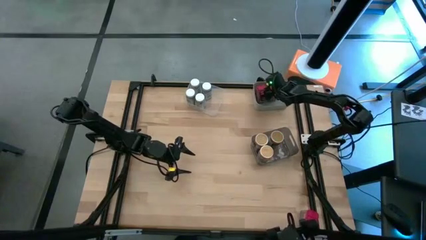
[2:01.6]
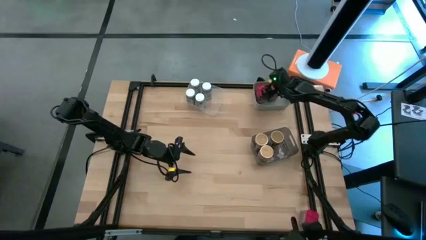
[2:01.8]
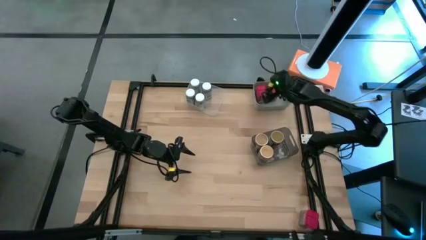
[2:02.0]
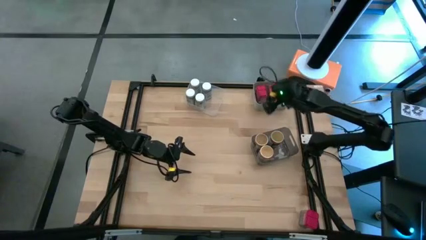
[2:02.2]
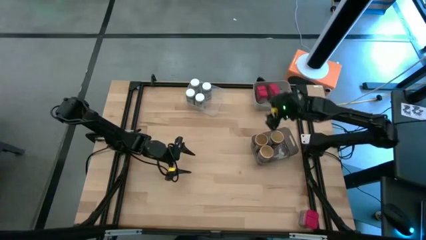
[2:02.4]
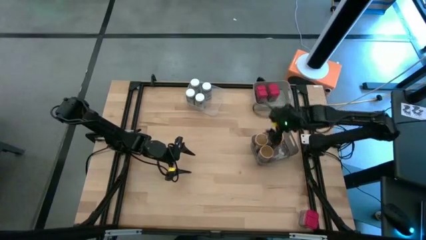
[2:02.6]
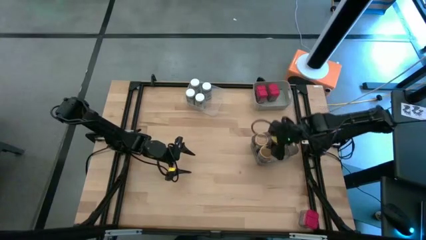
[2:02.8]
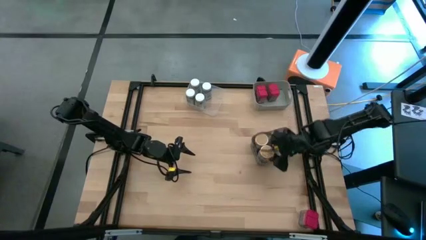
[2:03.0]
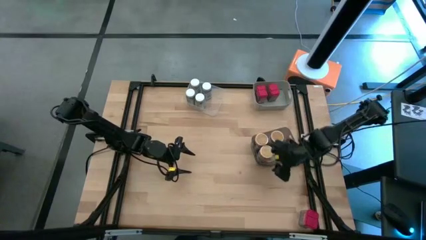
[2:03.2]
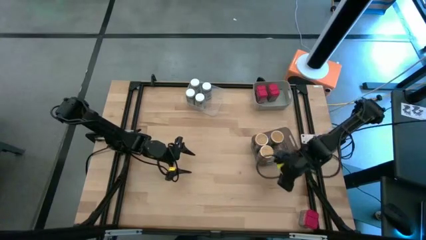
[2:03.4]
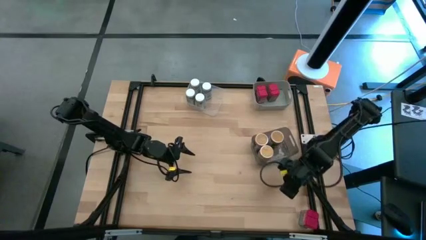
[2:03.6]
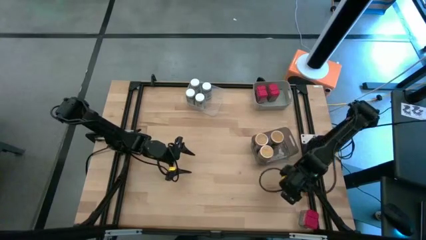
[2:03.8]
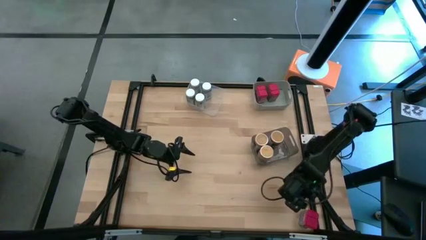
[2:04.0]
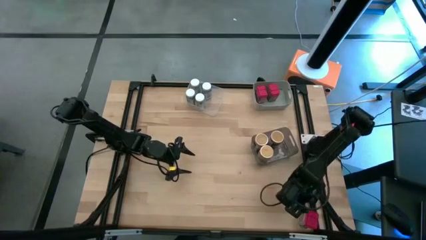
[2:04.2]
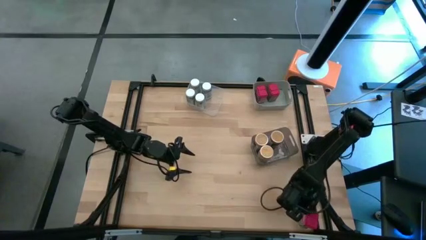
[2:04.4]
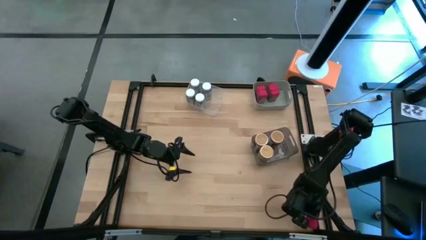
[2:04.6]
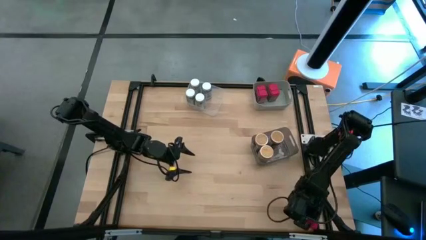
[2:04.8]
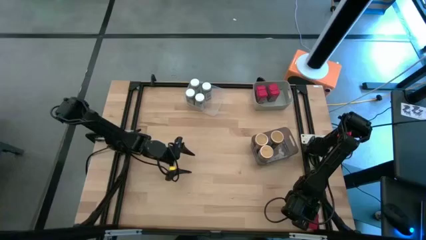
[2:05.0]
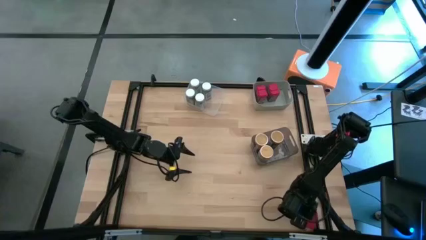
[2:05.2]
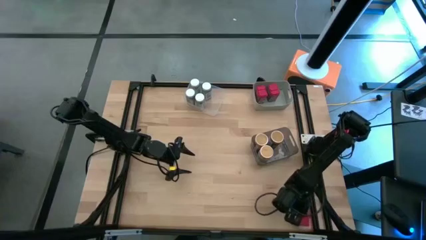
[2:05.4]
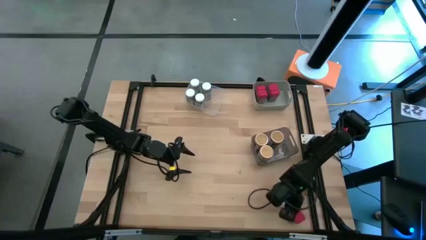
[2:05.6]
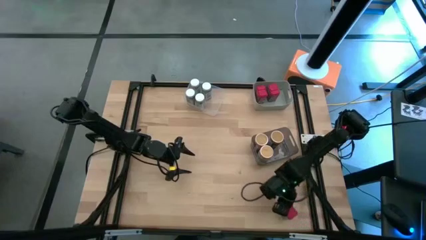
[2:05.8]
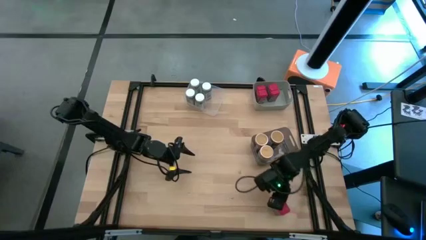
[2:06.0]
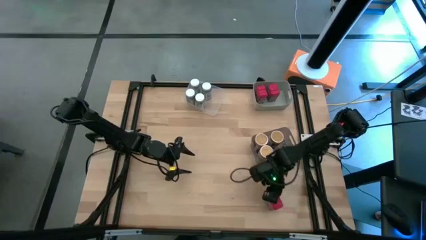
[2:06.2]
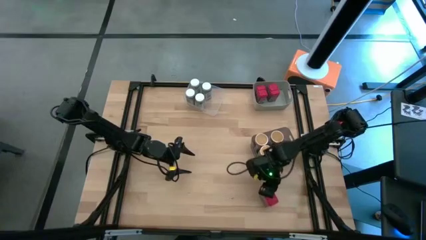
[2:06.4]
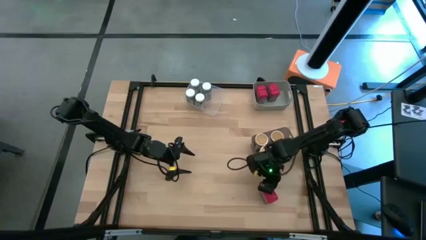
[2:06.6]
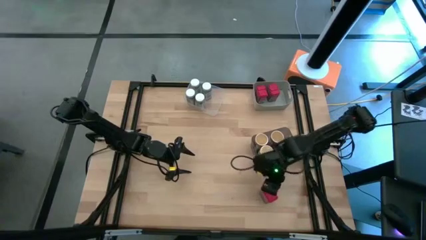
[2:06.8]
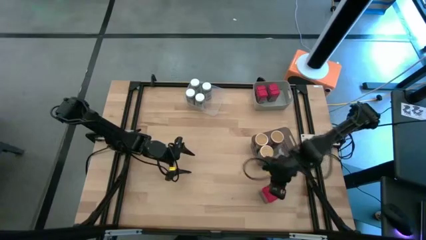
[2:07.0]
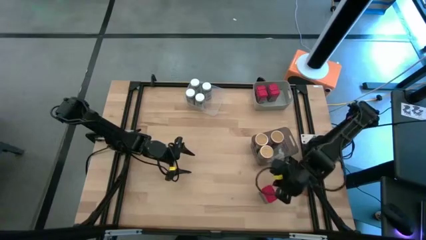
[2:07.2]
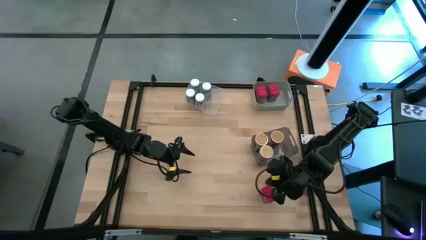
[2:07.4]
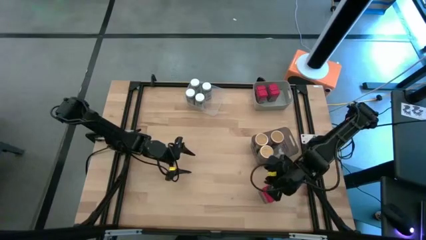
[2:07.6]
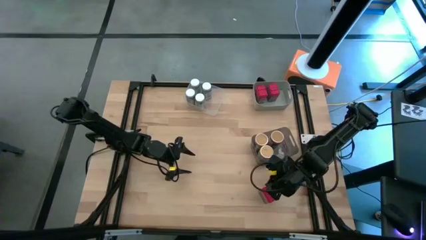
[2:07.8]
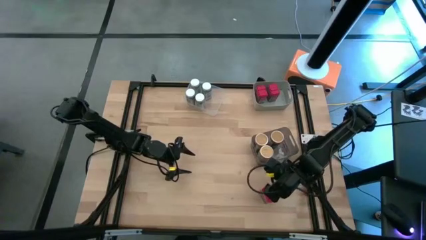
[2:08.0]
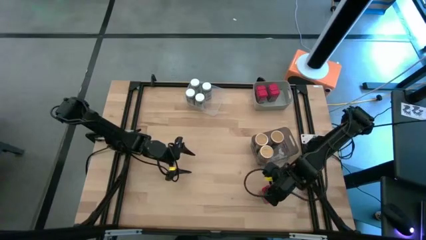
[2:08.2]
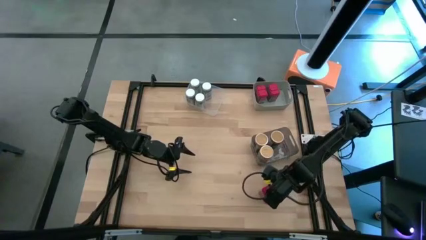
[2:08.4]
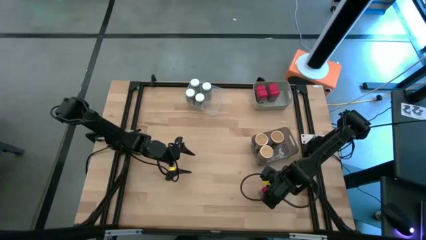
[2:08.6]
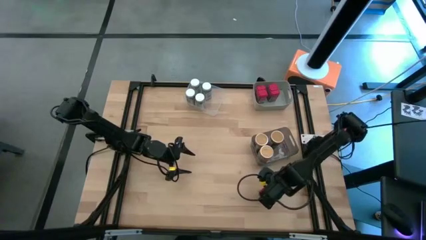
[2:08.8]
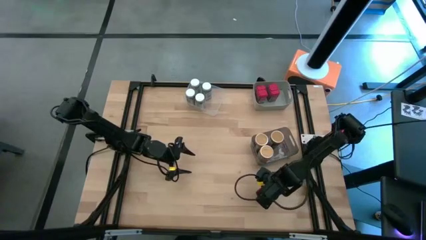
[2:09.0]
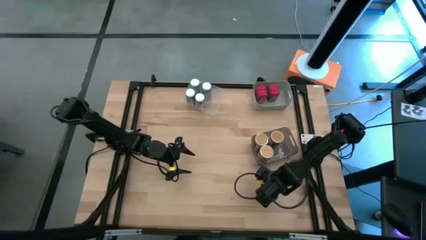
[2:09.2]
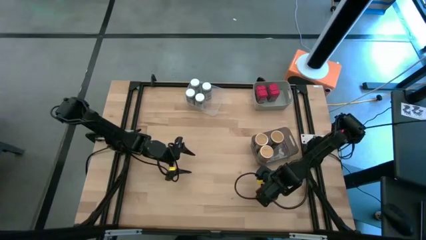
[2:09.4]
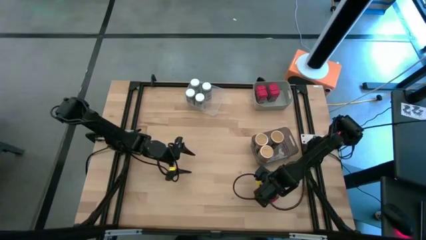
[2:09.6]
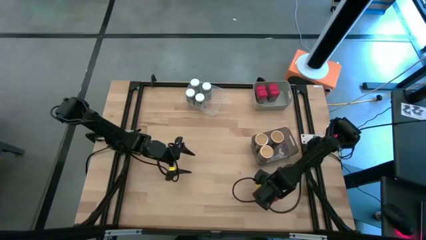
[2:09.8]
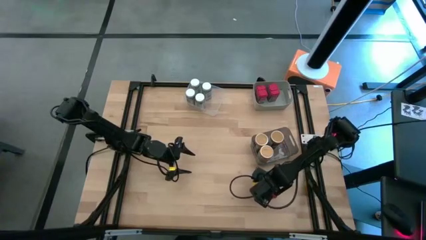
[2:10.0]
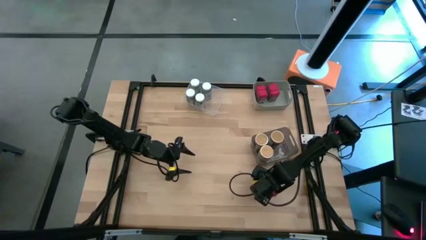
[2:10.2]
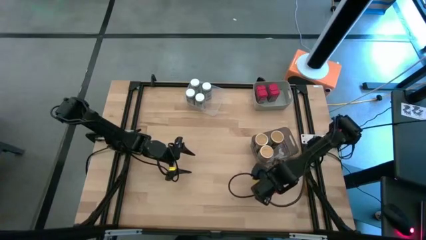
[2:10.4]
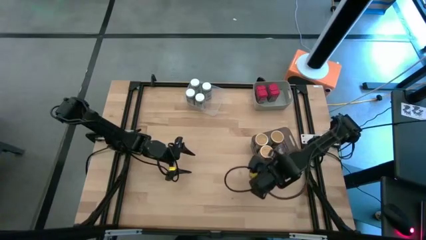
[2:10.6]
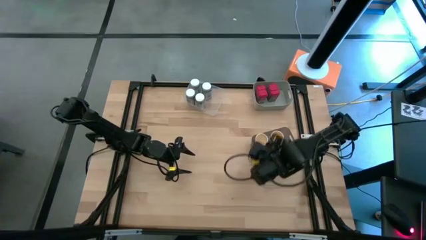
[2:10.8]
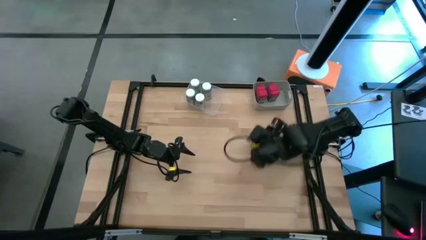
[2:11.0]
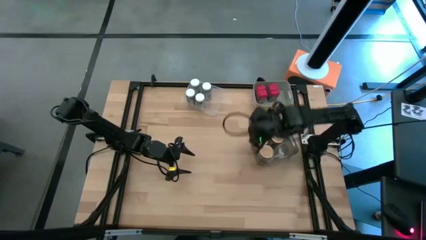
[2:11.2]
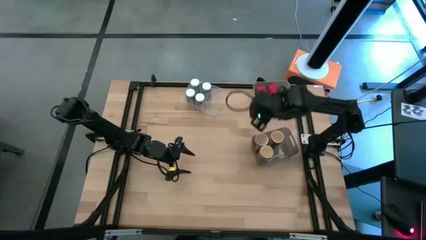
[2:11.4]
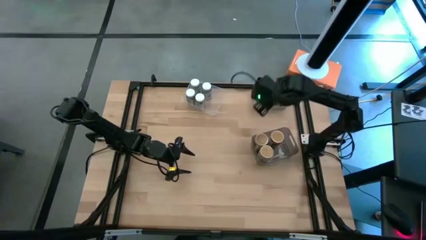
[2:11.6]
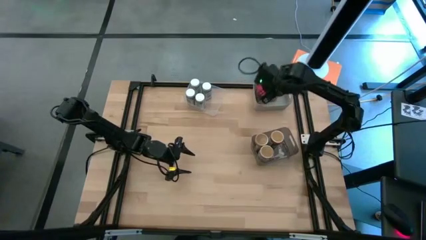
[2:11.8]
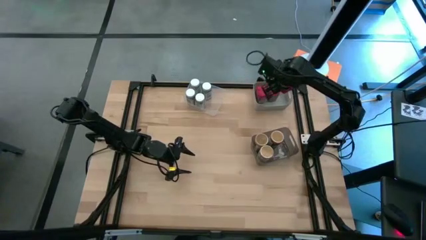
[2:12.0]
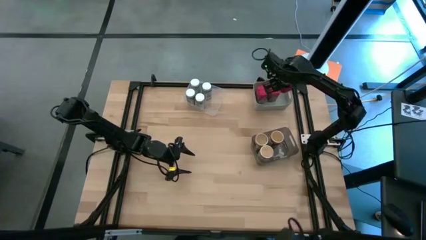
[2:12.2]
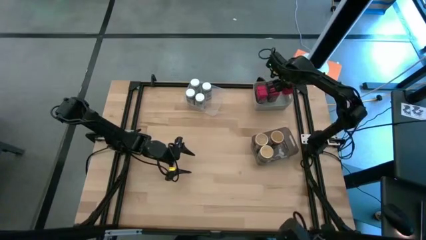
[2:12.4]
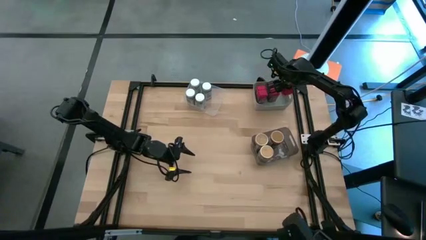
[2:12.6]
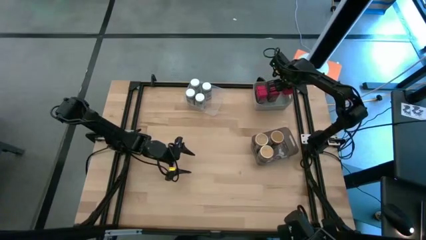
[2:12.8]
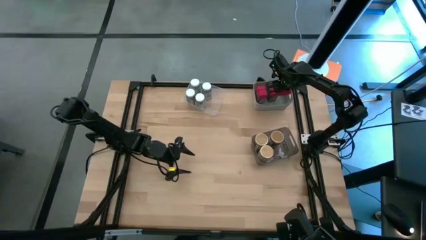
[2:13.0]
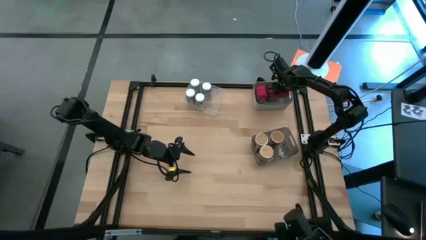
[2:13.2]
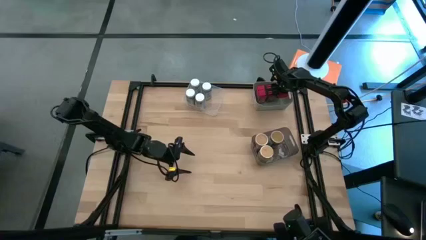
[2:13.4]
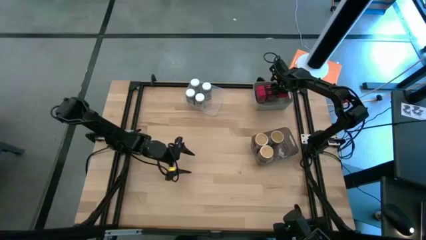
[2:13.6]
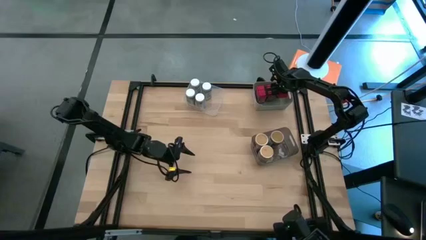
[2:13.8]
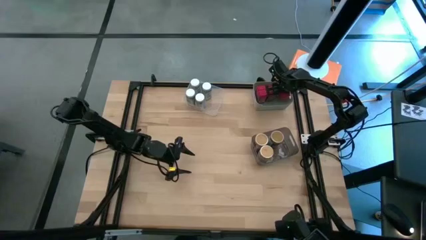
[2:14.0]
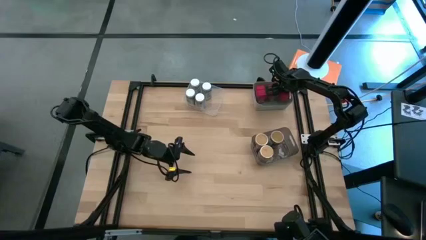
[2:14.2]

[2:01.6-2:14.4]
Task: Sort spices by type
Put the red seasoning can into the right bin

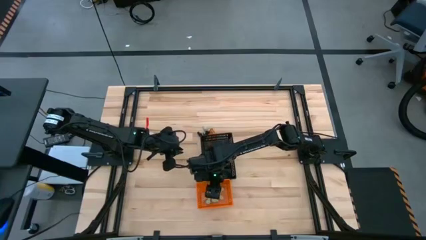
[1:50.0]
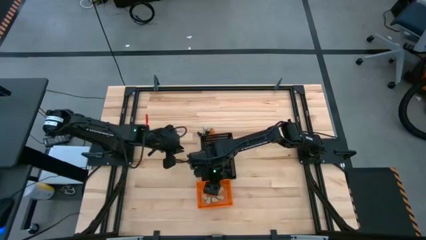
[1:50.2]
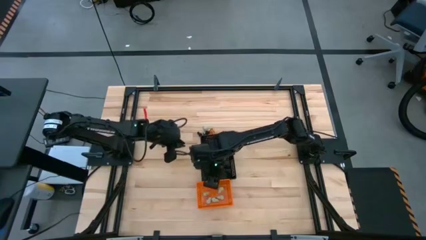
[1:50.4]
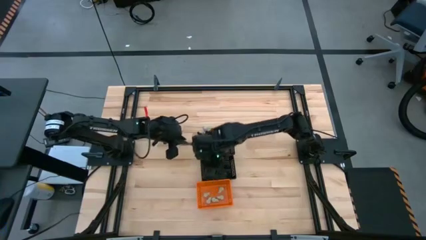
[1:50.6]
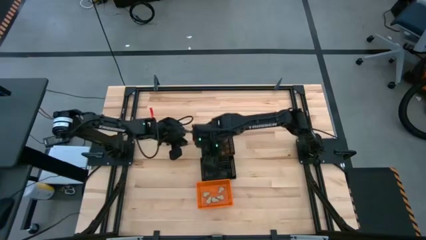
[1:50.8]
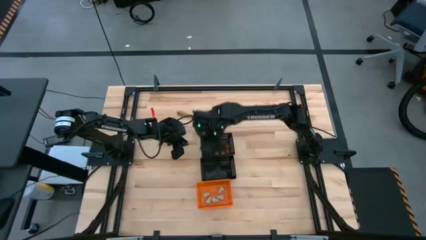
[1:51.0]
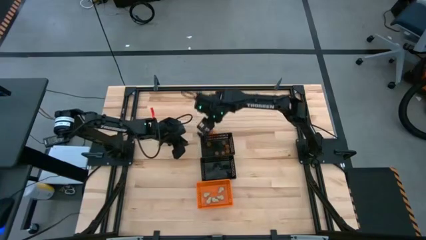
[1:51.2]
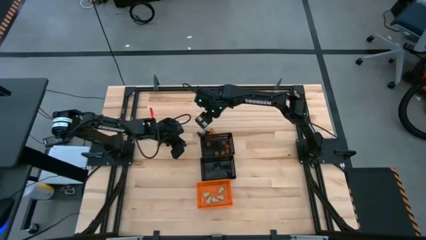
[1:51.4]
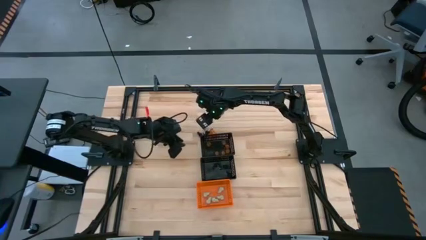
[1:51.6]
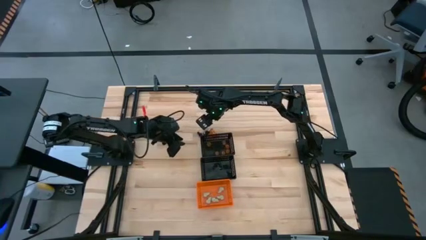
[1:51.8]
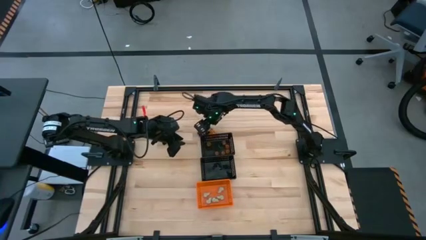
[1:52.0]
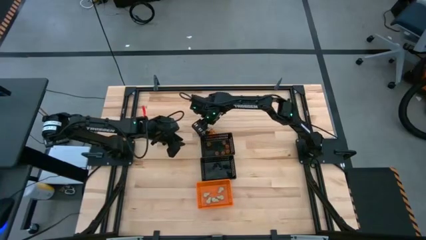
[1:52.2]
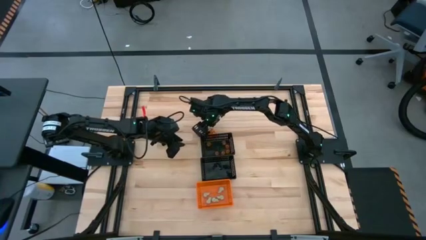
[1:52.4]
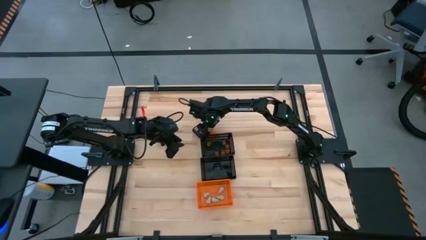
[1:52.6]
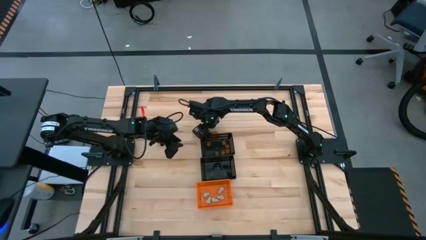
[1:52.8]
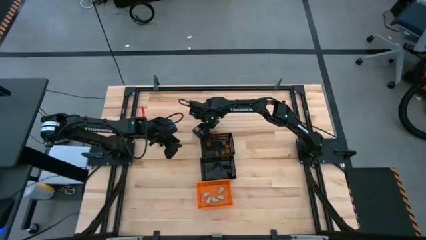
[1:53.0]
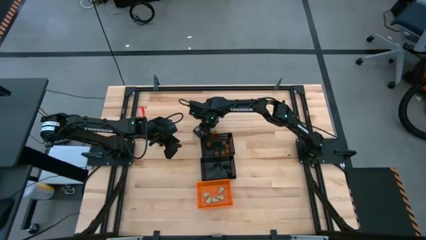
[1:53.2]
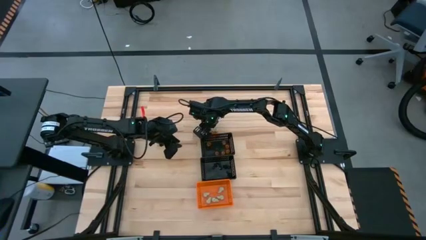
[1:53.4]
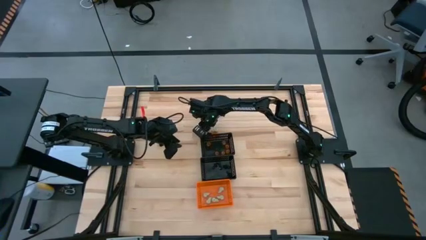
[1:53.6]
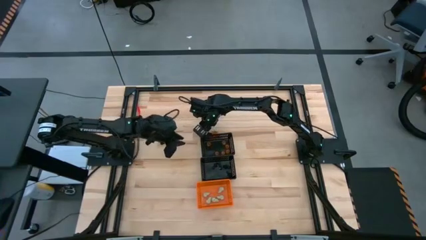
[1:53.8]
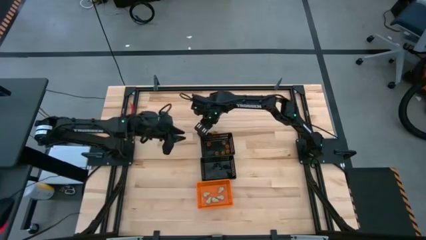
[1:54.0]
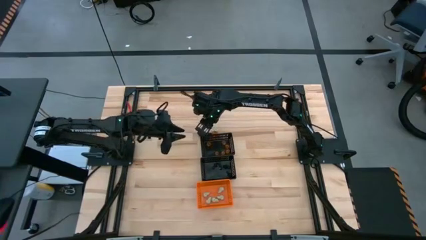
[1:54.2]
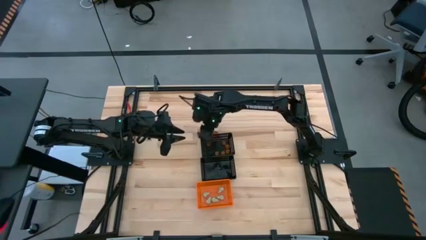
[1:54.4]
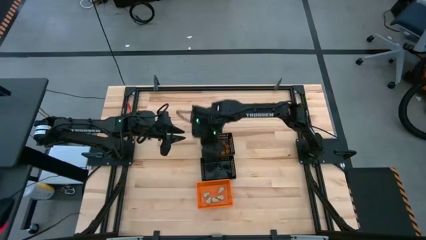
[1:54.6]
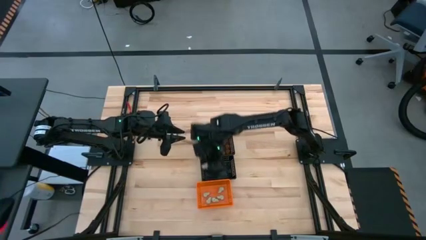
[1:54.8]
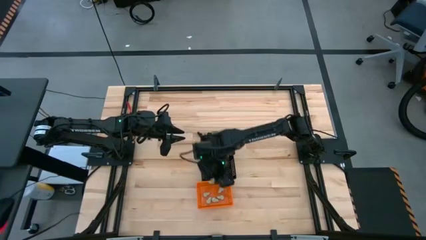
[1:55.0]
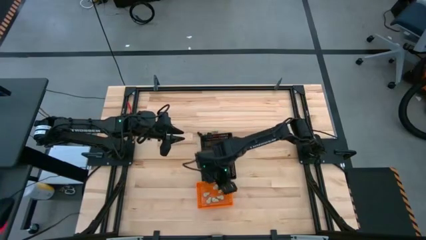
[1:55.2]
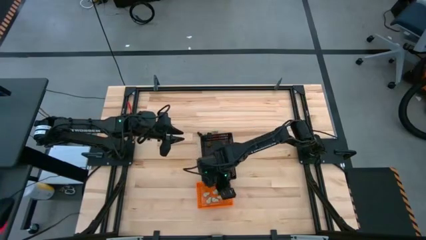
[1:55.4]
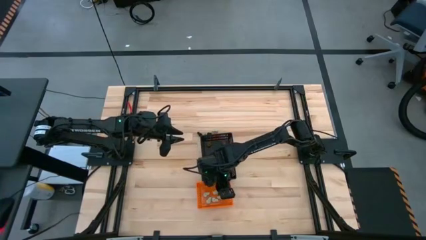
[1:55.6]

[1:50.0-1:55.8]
Task: Sort Halloween decoration
Put the white skull toy into the orange bin
